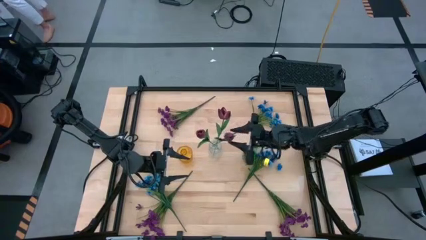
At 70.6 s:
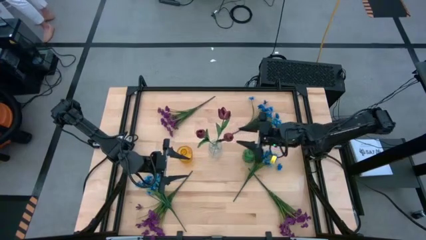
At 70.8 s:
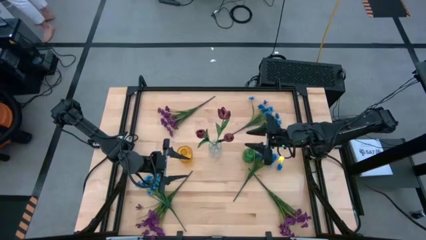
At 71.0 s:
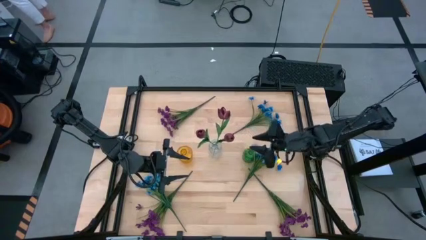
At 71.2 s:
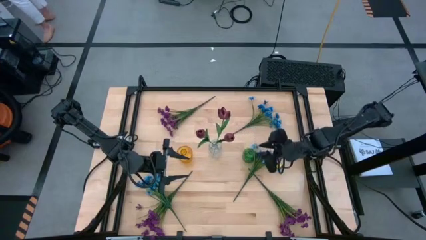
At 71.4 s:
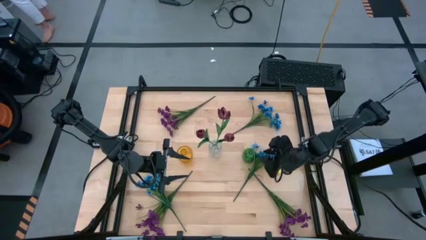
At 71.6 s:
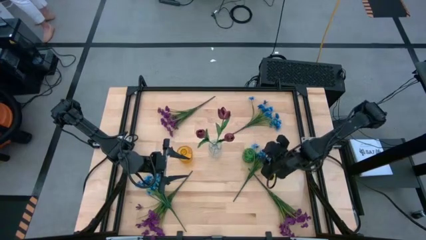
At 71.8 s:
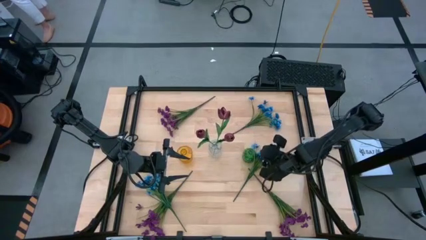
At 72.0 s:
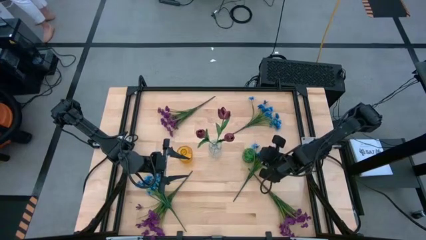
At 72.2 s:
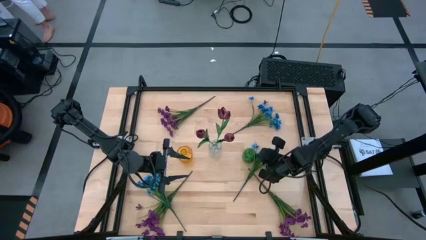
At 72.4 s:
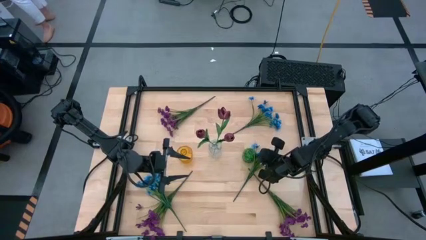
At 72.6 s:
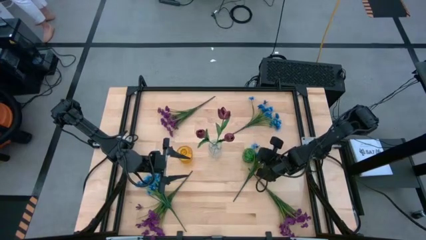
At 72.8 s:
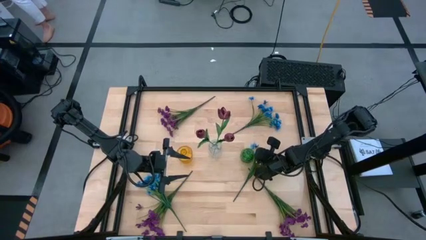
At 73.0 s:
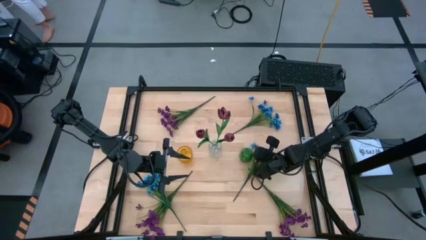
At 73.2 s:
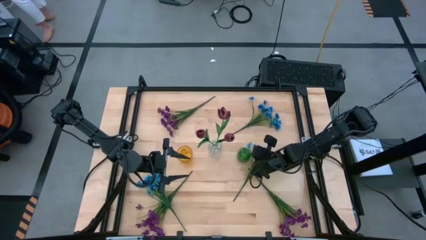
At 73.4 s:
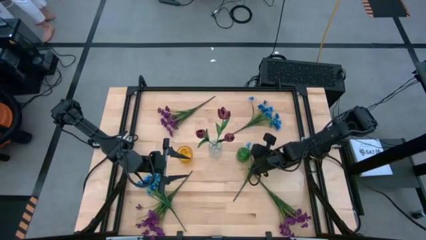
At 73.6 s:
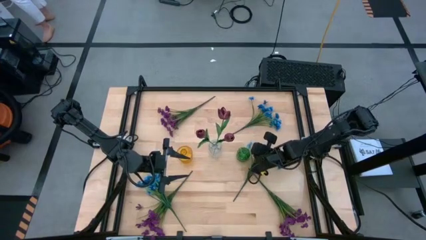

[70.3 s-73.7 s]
Task: Sort flowers into vase by color
Adjust the green vase

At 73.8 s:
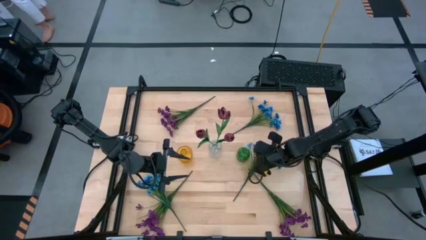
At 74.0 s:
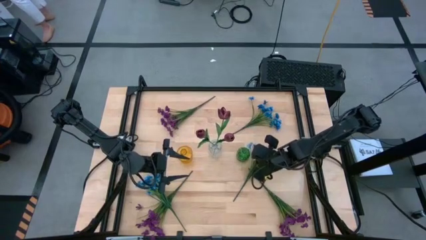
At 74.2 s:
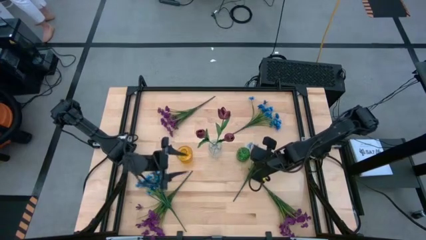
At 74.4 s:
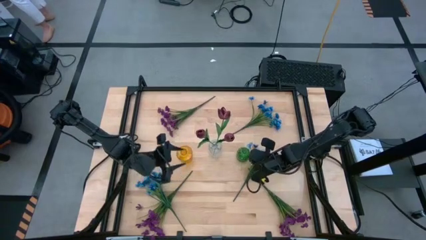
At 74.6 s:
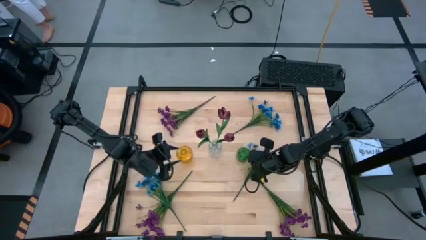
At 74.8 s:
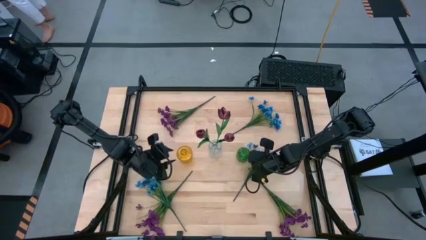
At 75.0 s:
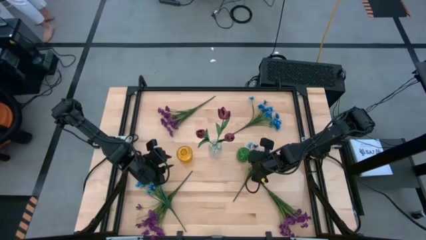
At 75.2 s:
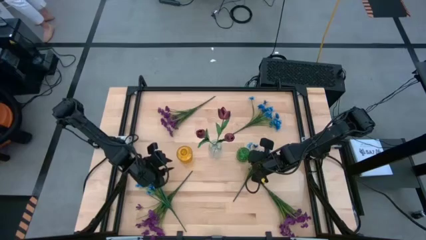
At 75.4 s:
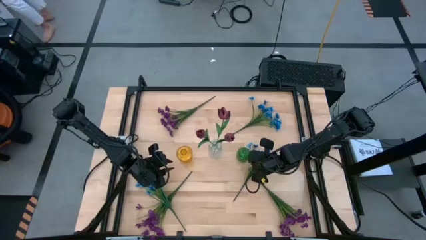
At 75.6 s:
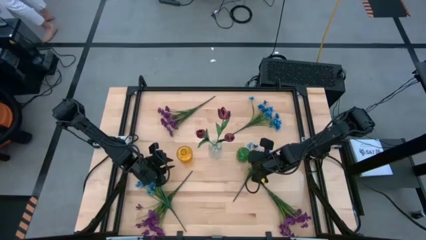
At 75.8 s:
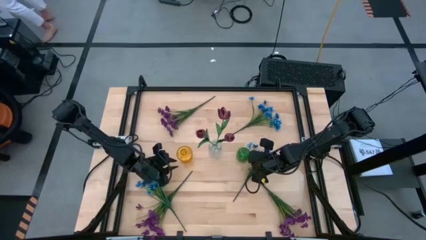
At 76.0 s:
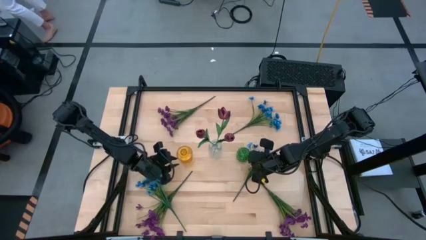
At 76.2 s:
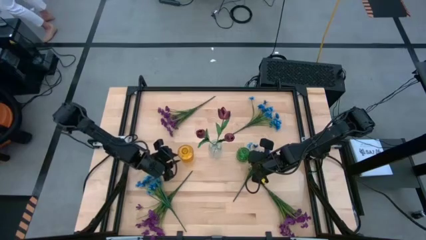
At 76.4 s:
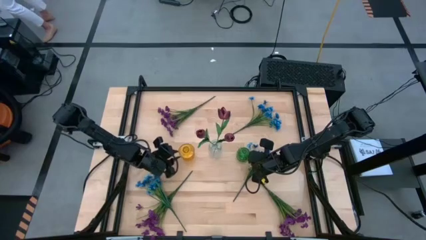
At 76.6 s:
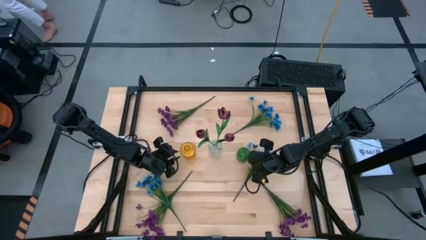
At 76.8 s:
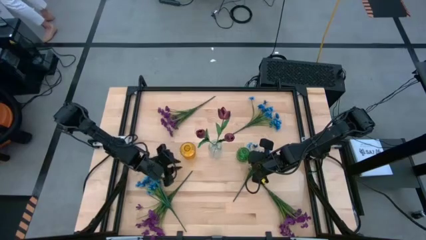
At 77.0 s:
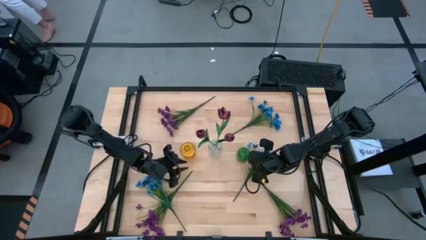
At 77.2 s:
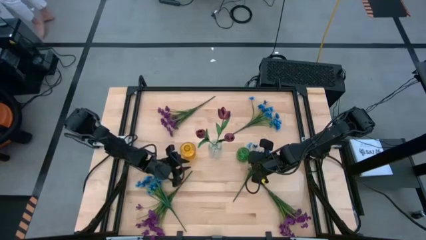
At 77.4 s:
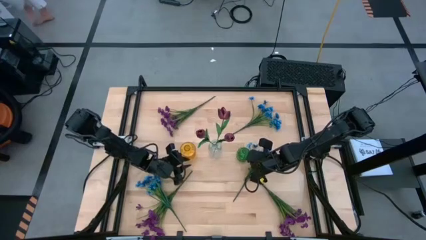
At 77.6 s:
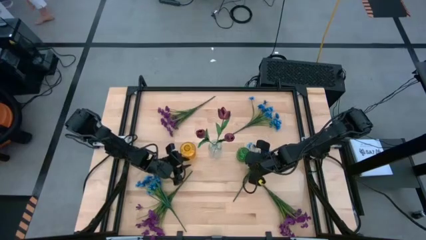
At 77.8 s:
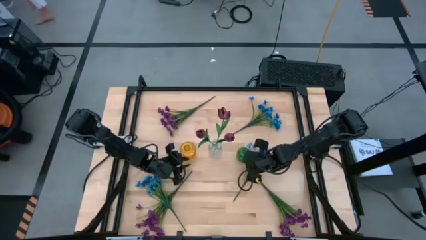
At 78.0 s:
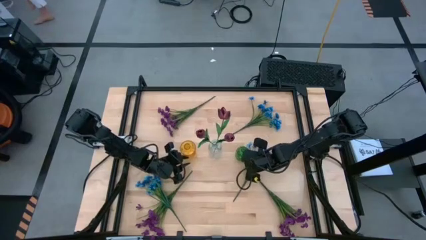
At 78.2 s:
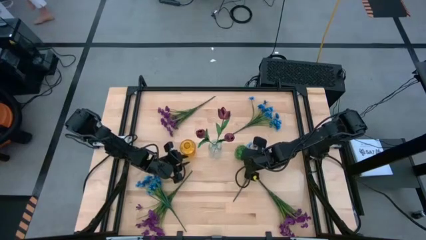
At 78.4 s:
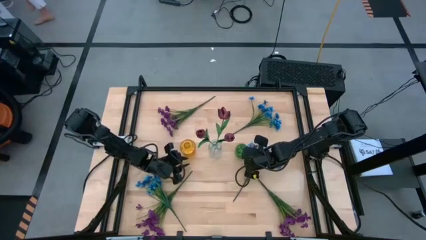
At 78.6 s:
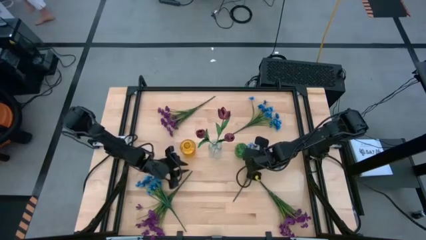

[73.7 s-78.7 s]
Adjust the yellow vase

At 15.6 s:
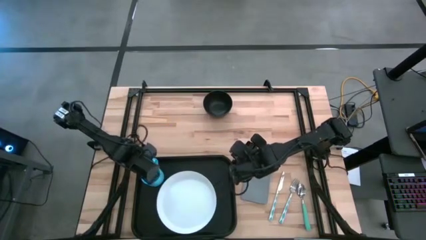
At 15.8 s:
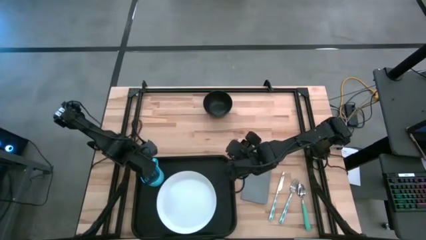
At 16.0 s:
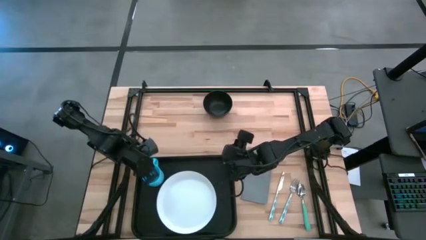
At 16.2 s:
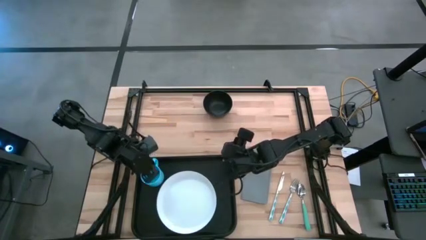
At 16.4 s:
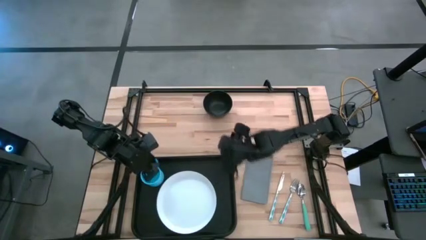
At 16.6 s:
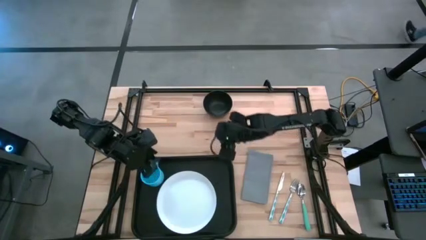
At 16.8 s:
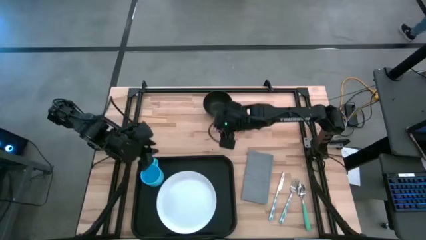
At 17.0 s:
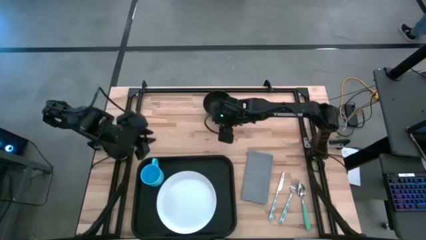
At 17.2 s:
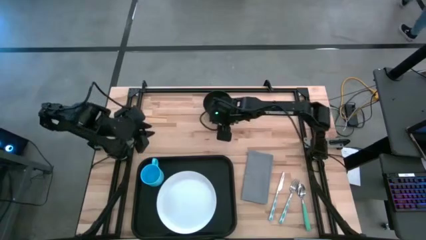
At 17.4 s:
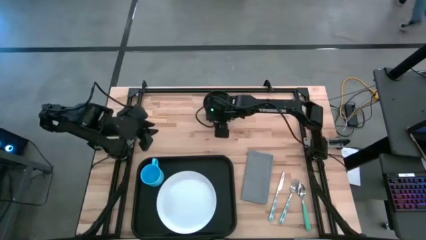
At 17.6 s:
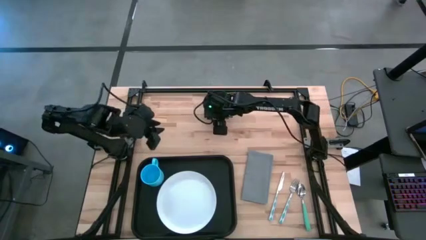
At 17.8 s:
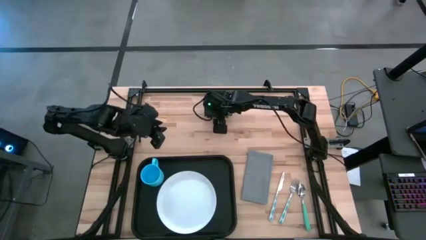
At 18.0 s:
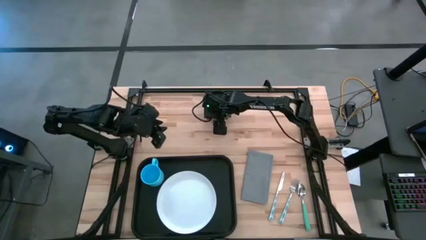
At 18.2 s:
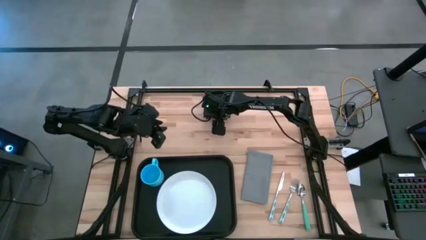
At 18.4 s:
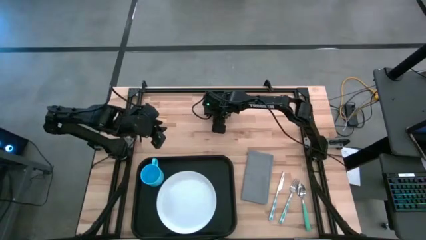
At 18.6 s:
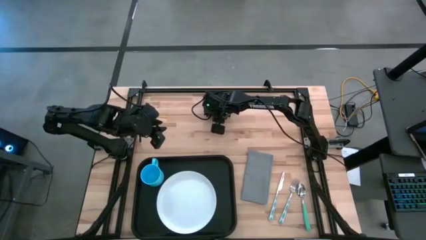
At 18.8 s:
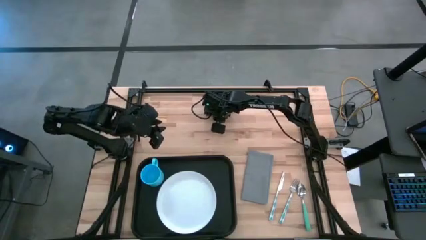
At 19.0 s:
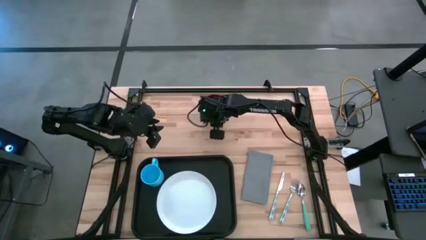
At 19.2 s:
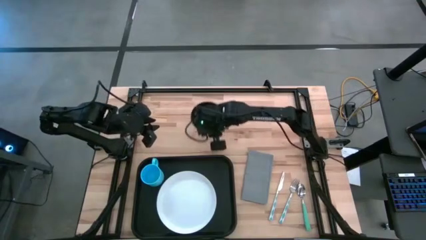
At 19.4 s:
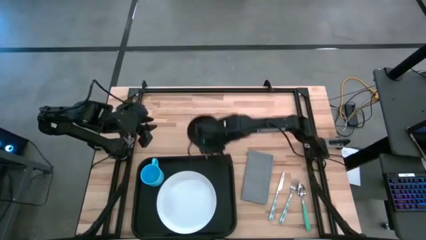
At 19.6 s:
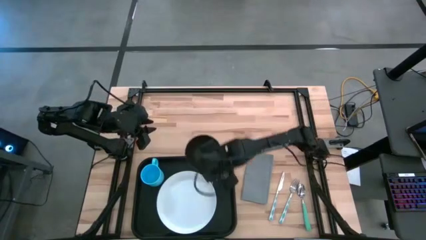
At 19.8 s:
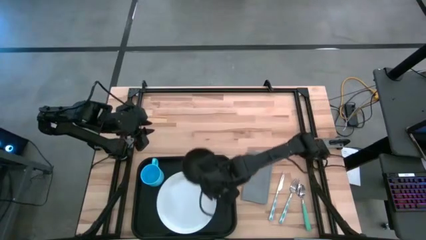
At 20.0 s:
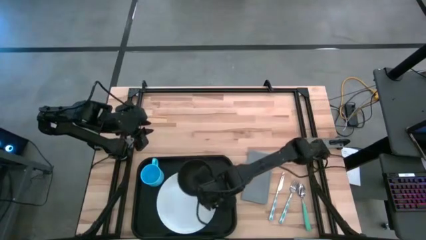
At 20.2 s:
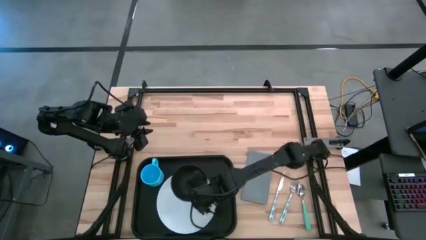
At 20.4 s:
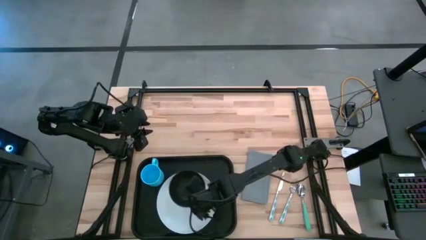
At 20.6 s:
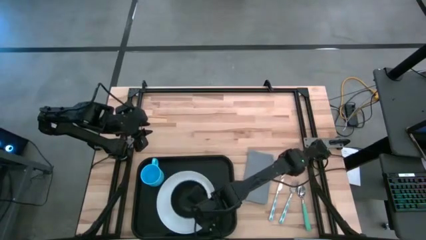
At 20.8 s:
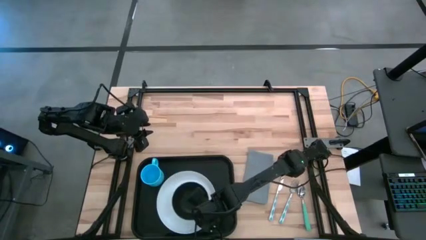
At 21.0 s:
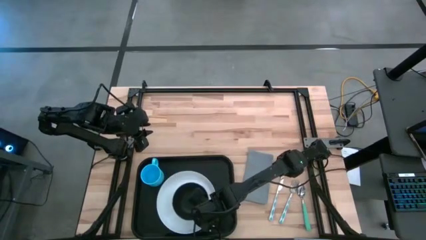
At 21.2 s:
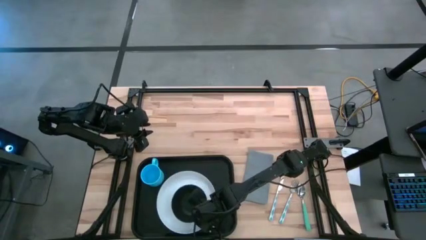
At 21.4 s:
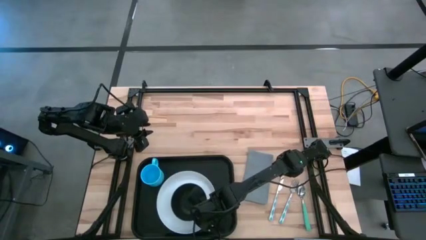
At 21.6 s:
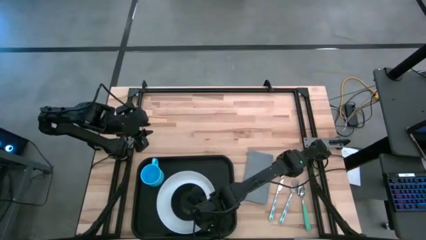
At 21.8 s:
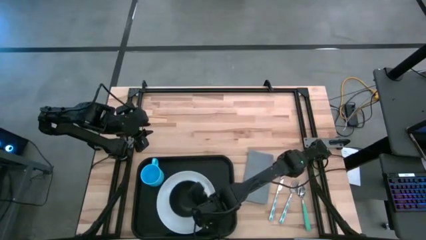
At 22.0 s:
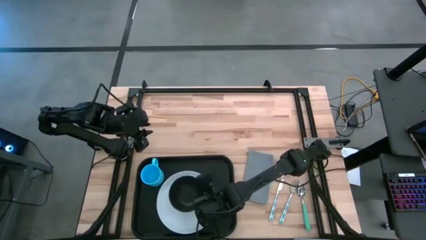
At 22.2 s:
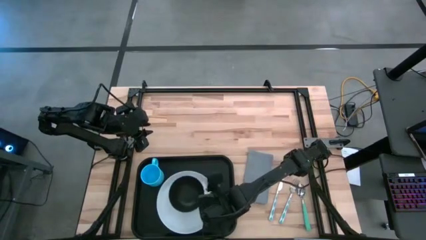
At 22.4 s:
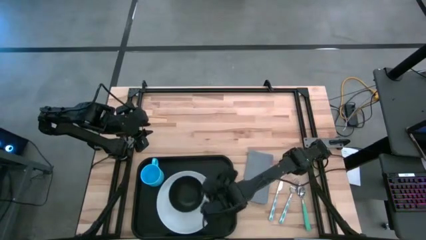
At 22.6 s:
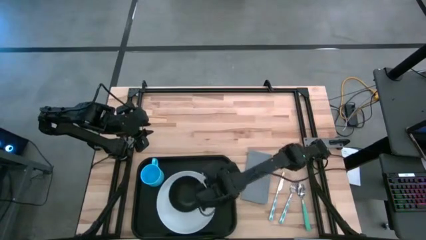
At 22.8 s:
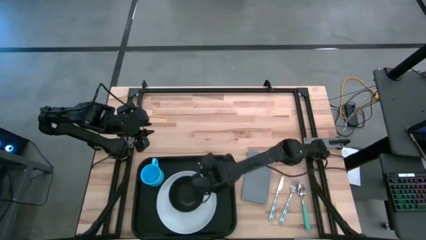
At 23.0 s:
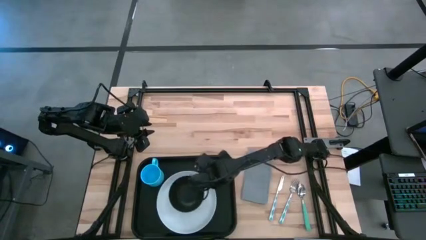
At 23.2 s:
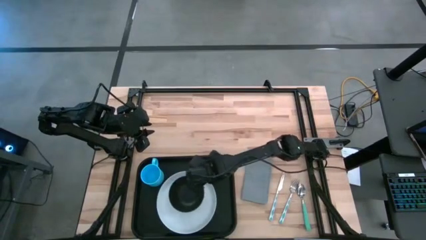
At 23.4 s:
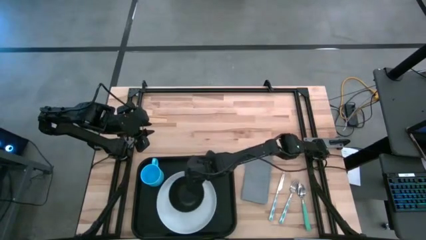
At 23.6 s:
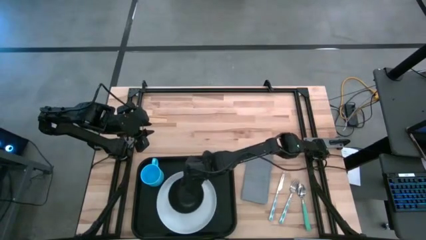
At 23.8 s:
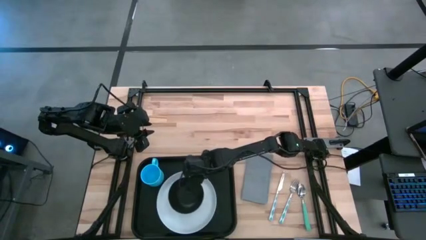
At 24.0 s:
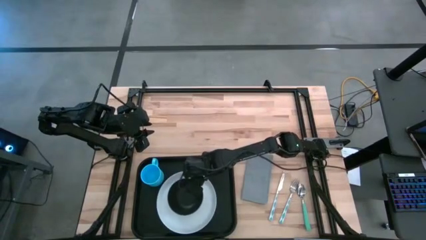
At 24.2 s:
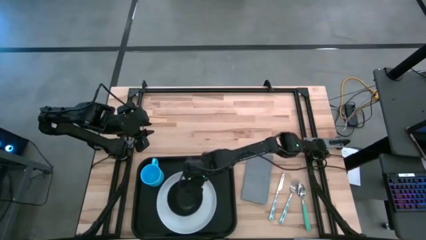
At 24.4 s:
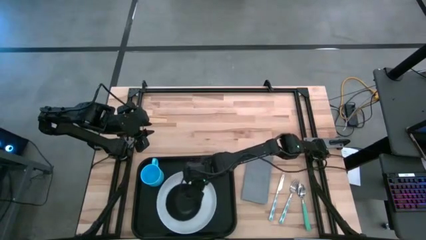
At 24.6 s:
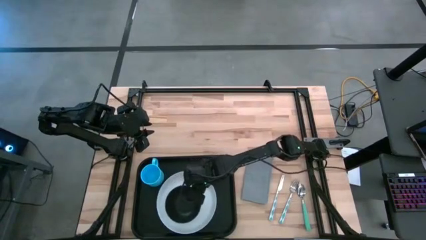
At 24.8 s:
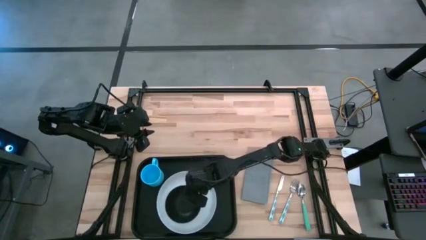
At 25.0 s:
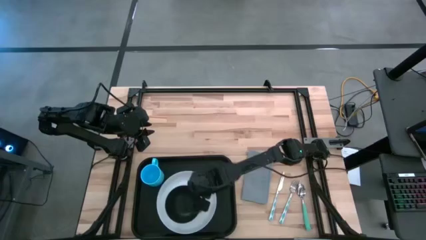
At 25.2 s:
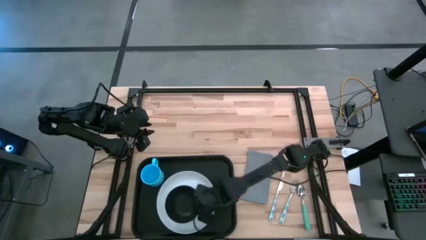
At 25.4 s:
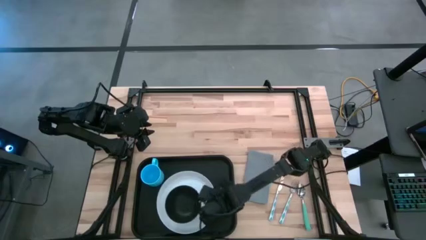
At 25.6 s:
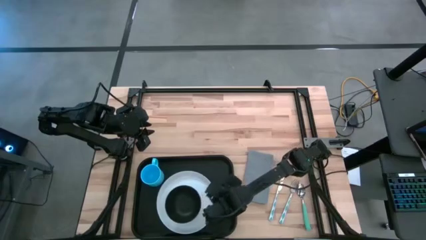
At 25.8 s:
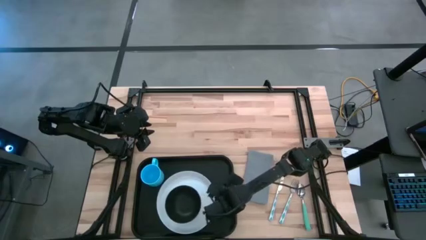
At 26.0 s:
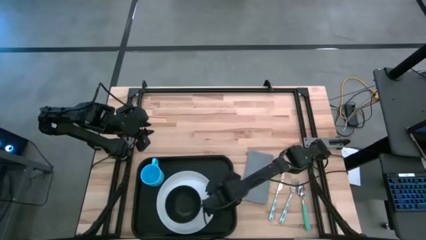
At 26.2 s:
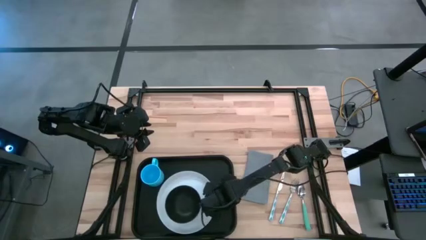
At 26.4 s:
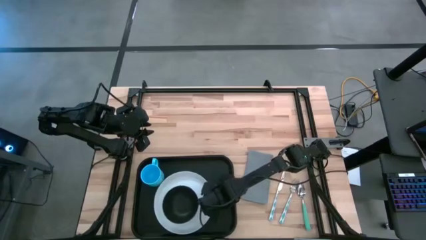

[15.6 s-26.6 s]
Task: Set up tray
Put the black bowl on top of the white plate on the black serving tray
